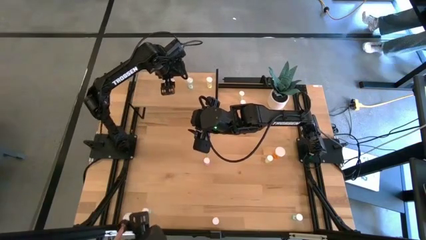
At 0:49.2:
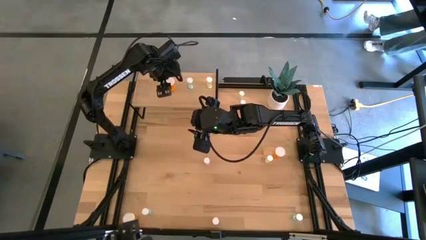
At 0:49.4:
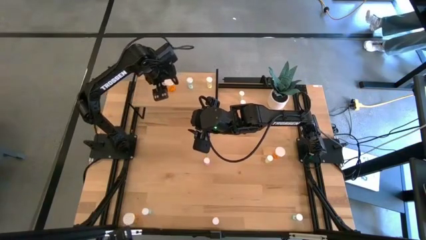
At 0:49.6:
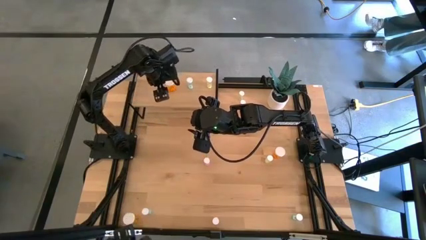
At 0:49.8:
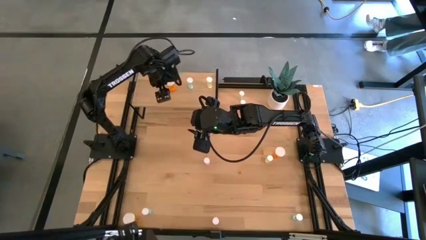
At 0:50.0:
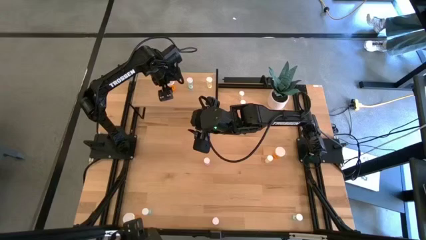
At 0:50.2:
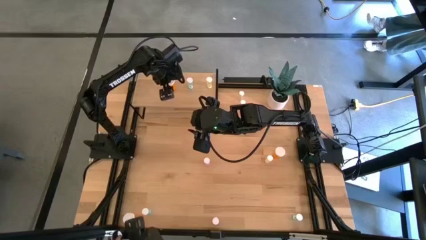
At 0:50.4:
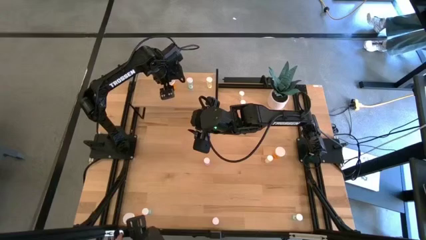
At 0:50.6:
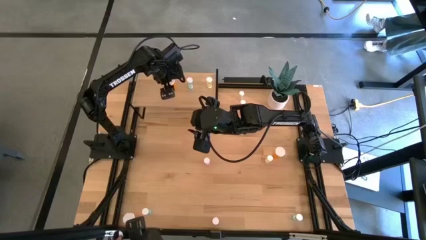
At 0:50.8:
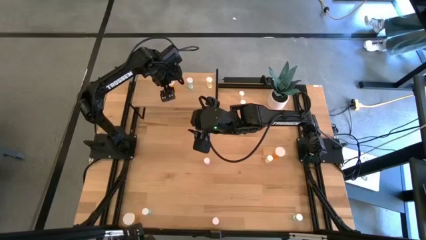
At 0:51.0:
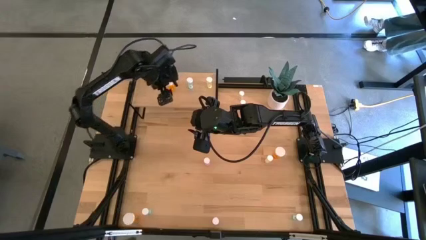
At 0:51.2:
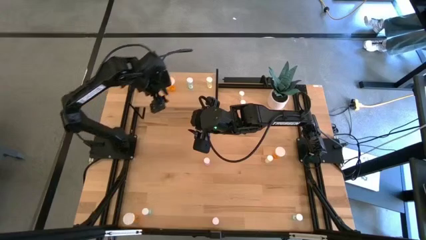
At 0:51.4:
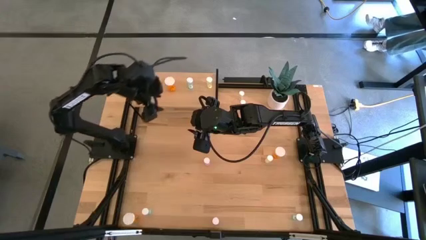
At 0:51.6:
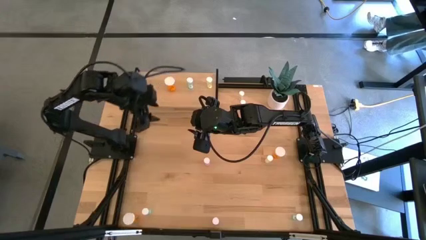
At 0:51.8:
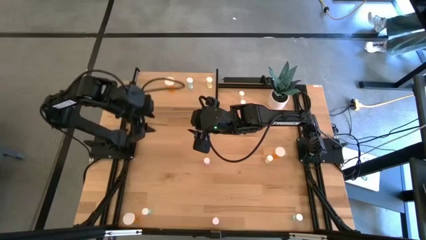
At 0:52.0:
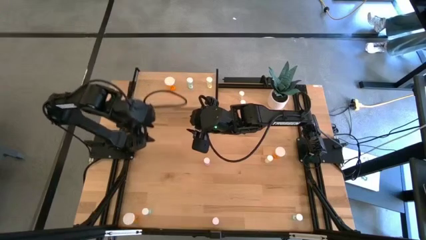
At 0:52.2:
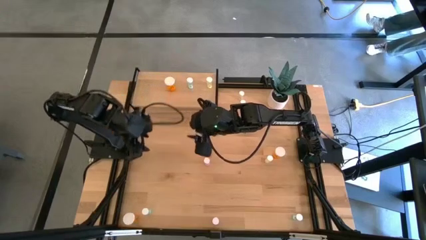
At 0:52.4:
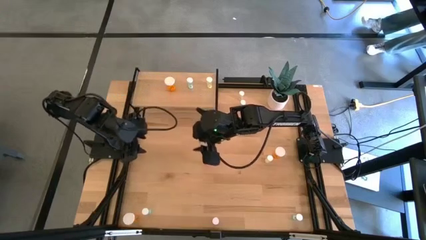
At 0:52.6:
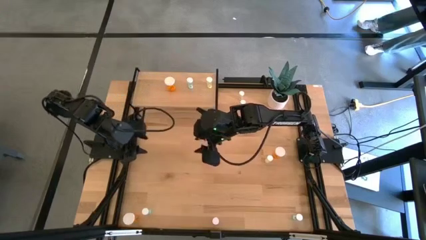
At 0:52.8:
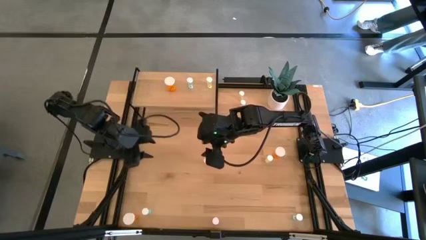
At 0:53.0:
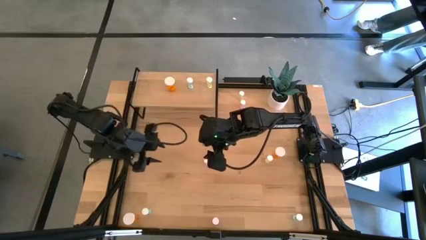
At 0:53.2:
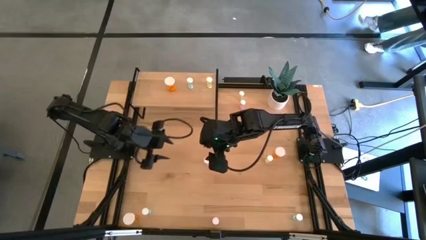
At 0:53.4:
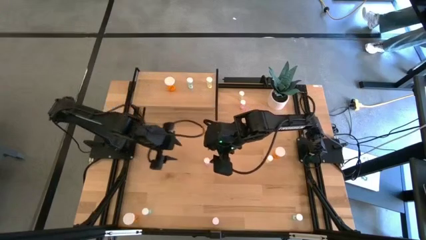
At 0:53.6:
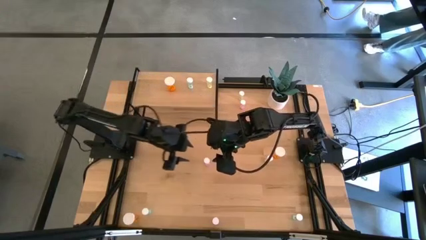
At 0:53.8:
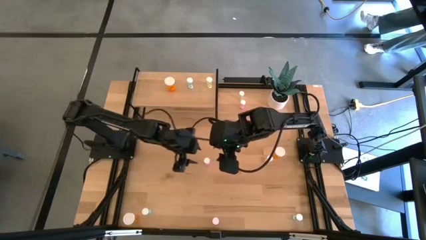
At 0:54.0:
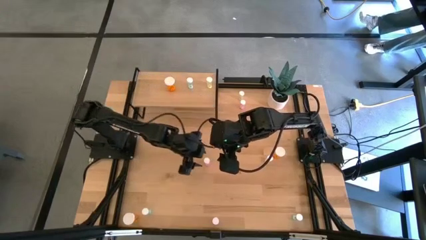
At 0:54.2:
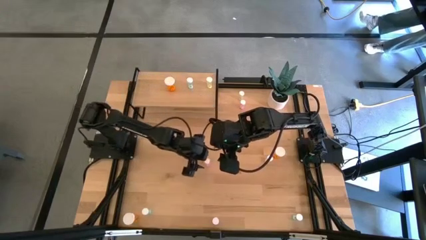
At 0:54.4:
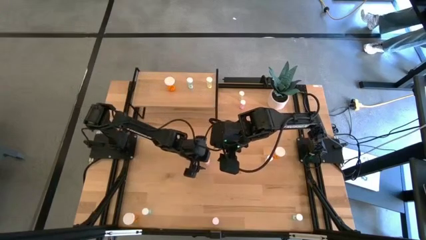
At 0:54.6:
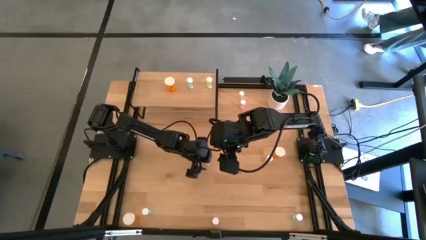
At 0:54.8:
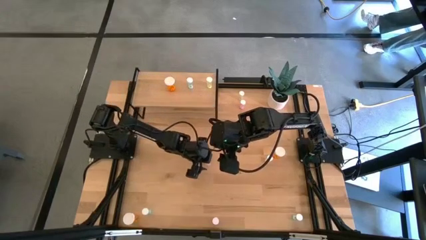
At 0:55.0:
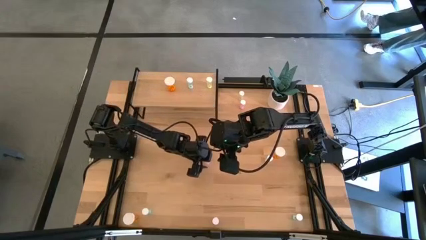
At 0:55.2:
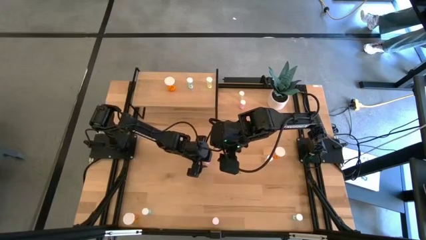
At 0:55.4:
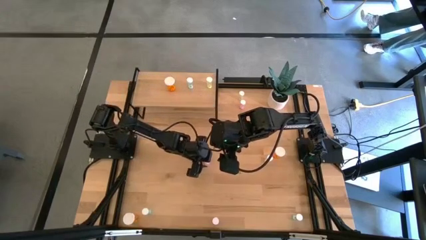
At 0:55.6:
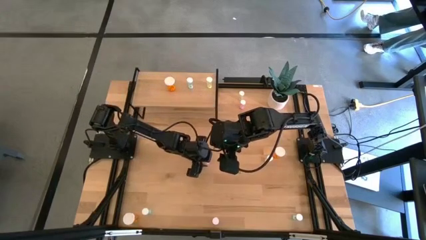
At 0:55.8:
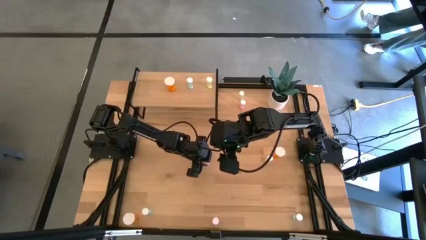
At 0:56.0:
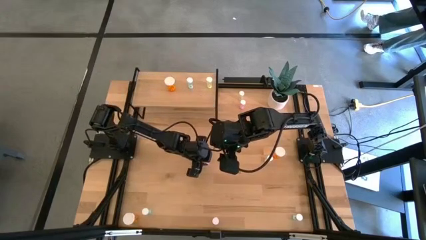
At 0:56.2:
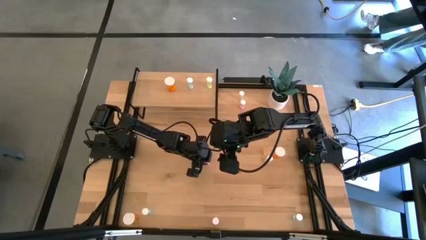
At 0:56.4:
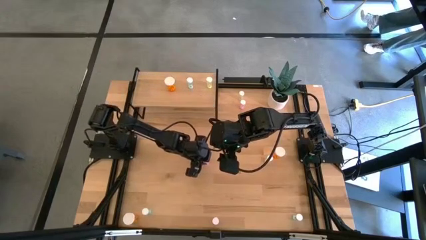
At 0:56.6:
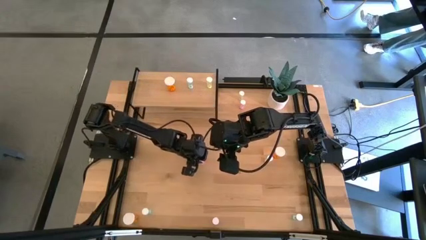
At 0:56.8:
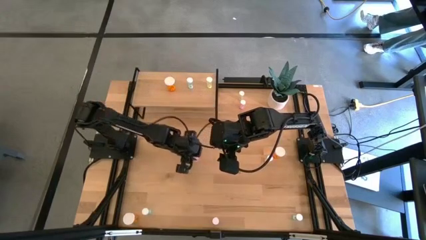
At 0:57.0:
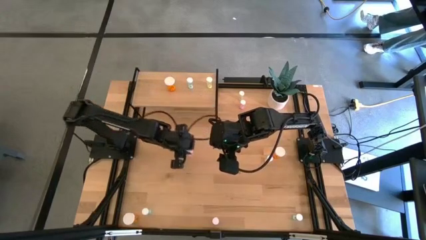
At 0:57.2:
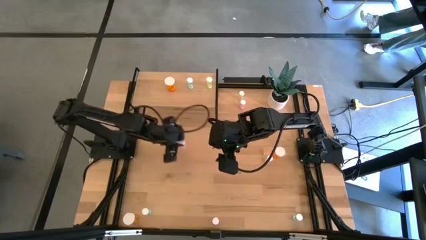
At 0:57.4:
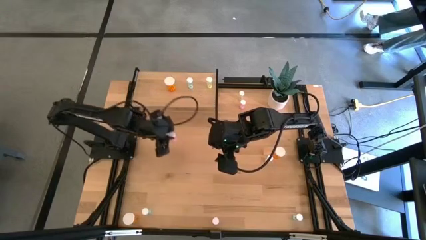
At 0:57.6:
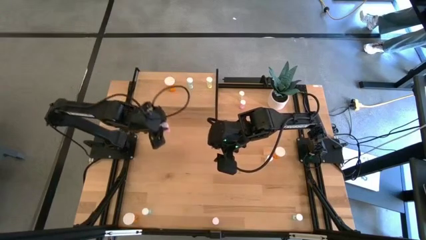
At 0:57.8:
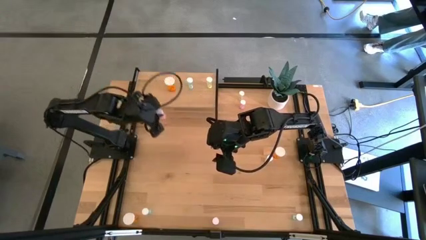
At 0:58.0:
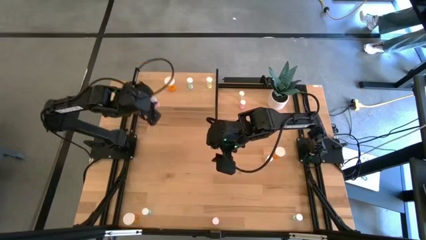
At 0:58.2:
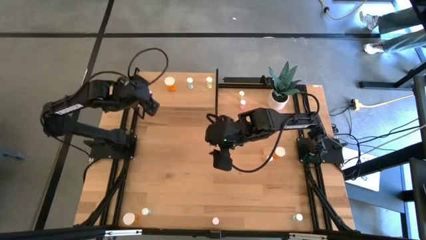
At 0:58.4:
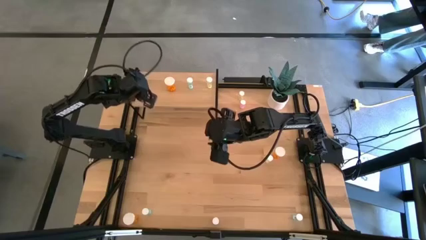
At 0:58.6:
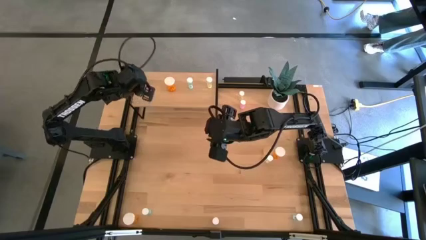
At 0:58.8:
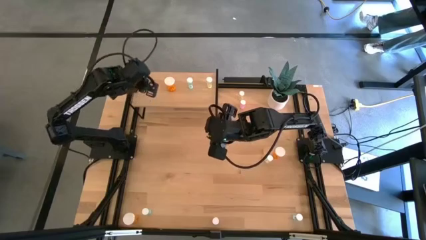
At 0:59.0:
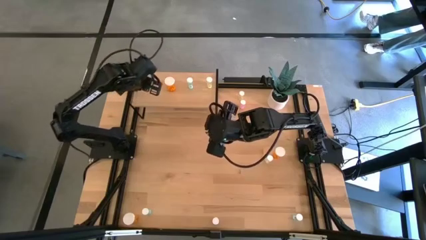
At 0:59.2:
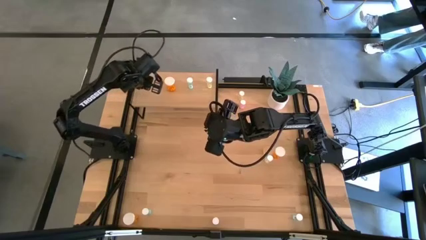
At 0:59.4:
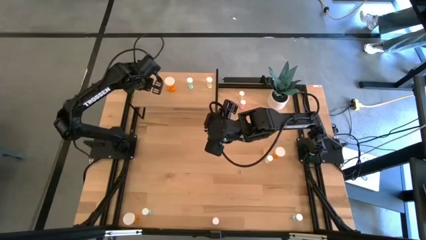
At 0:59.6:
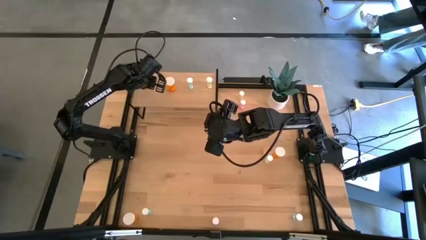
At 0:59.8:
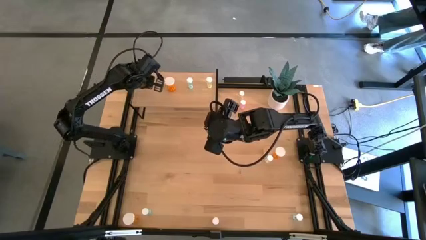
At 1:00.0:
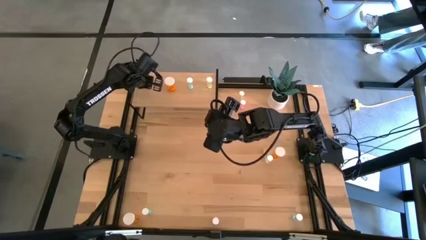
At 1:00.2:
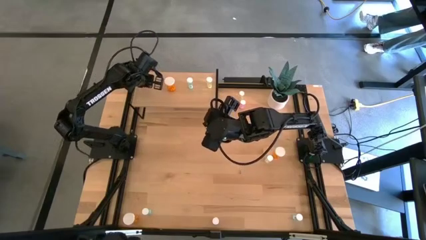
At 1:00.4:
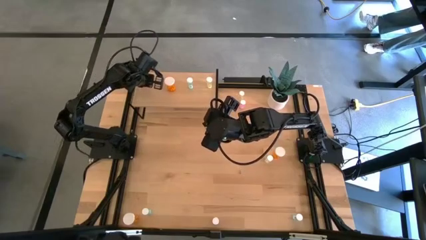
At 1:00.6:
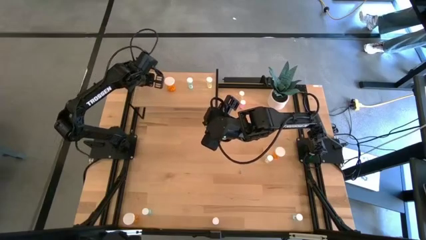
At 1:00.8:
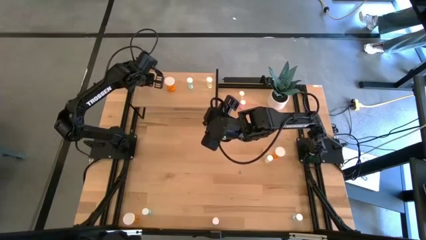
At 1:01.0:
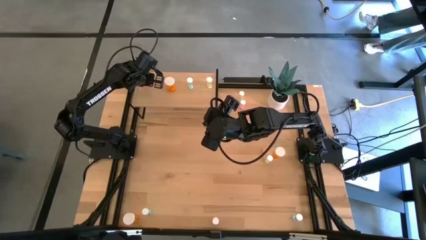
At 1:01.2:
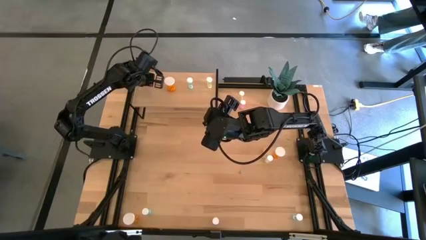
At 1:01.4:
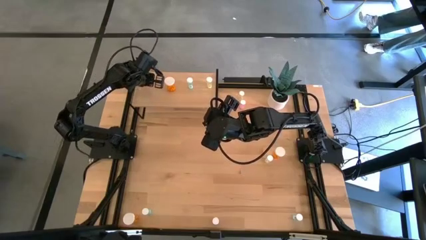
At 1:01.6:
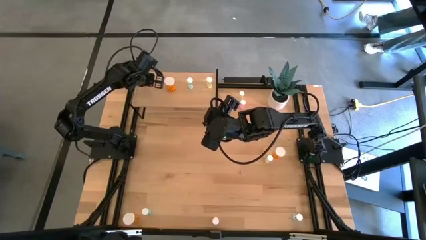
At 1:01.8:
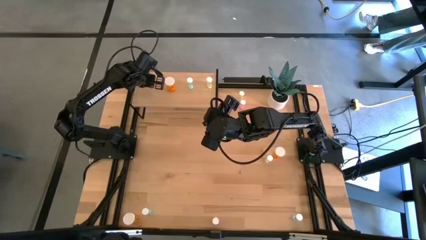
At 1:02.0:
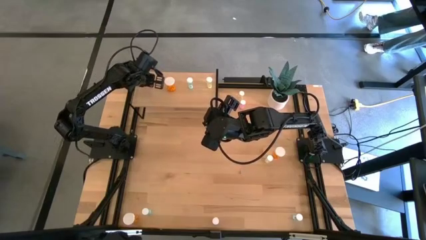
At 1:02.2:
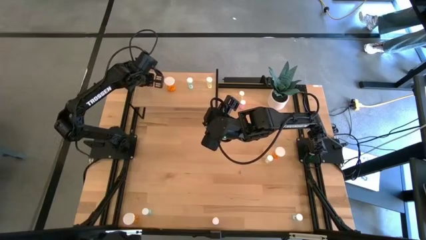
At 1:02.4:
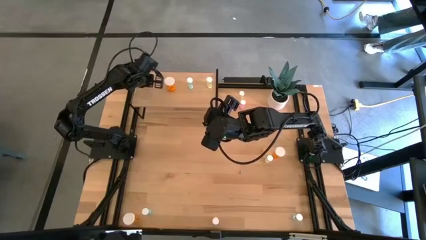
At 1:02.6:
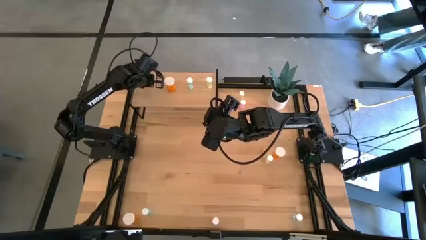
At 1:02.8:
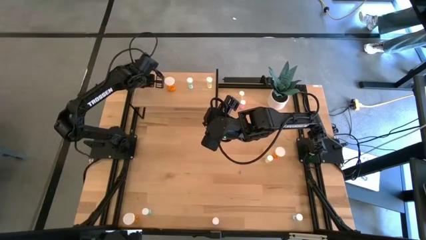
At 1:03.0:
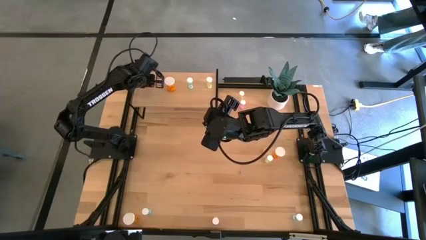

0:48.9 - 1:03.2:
Task: Pick and place medicine bottles onto shelf by color
Put the middle pink pill bottle on the shelf

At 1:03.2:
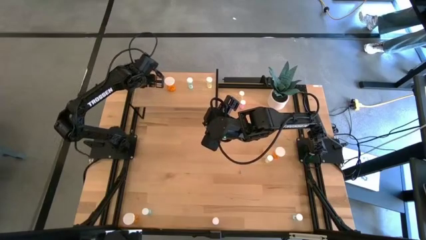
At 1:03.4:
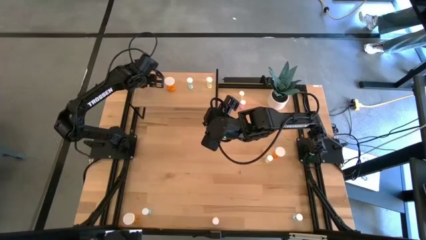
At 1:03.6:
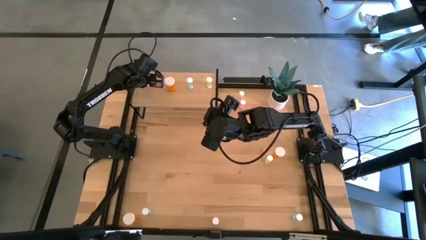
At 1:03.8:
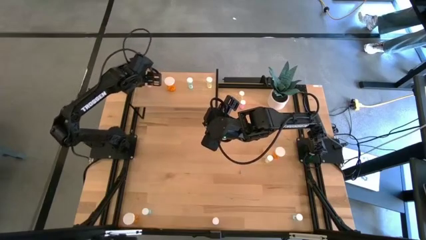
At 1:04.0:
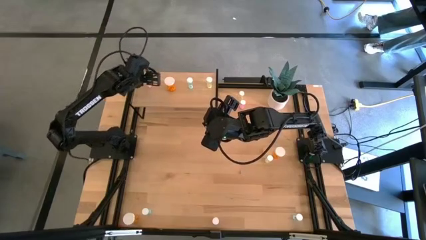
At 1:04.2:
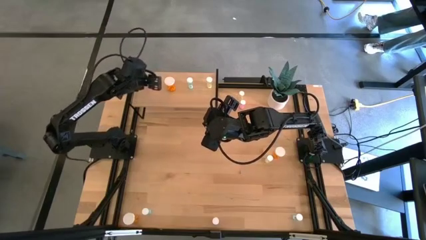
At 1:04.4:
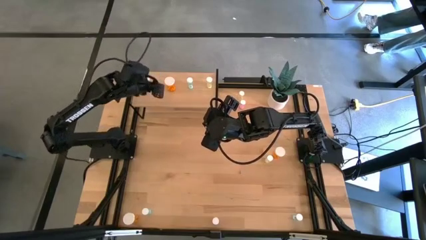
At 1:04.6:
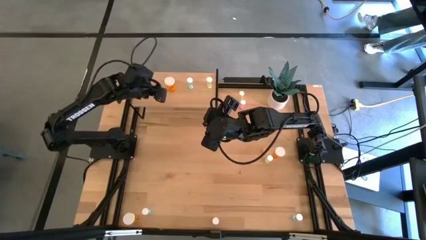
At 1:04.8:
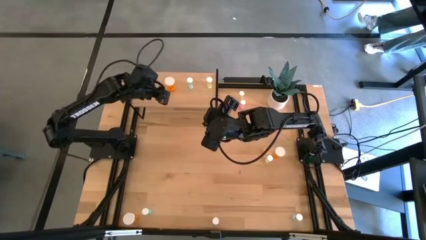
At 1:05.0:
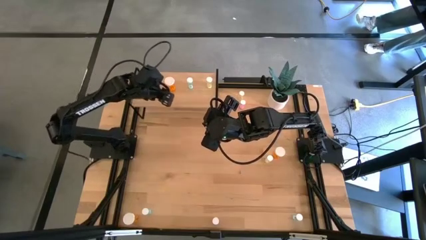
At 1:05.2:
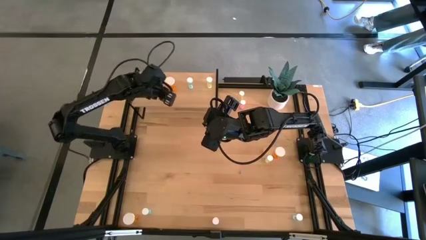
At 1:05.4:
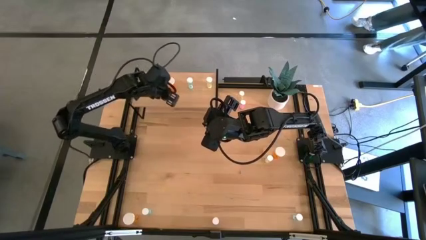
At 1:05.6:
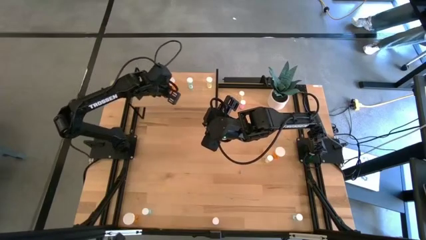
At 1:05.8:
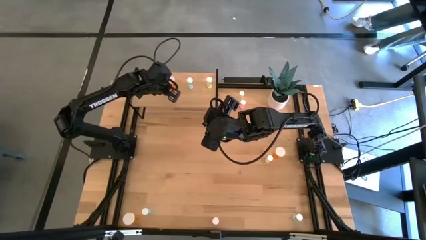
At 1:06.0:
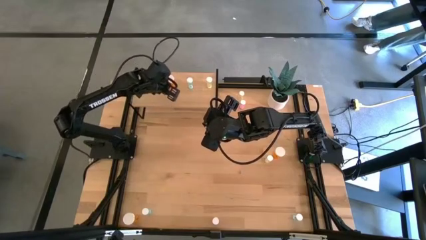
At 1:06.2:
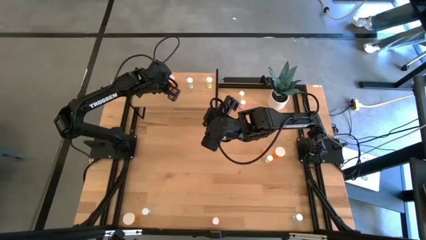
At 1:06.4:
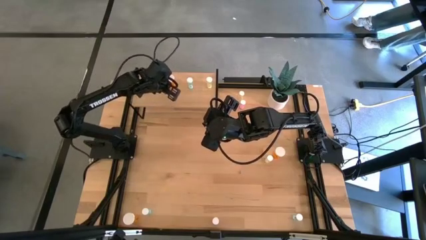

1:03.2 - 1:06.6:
Adjust the orange pill bottle on the shelf
